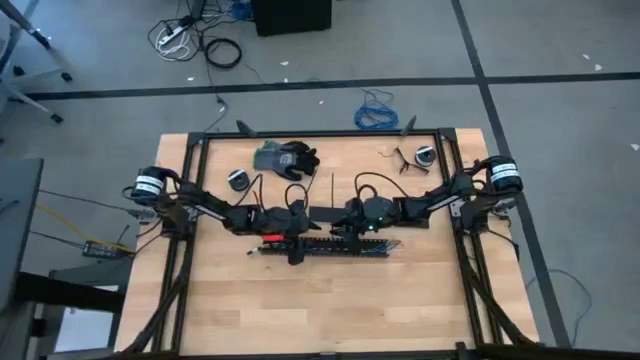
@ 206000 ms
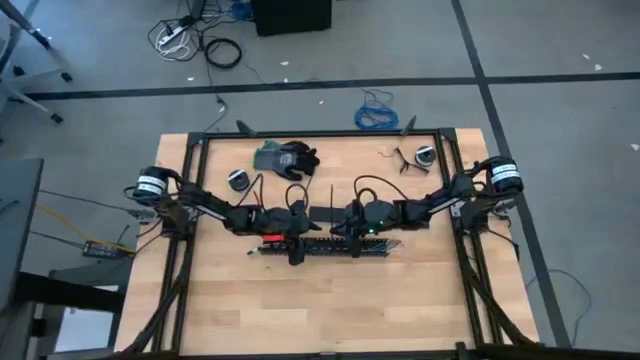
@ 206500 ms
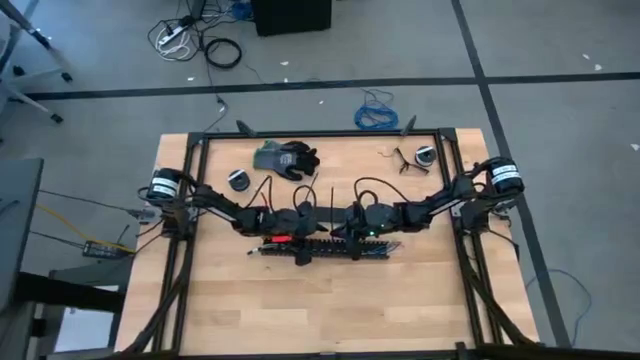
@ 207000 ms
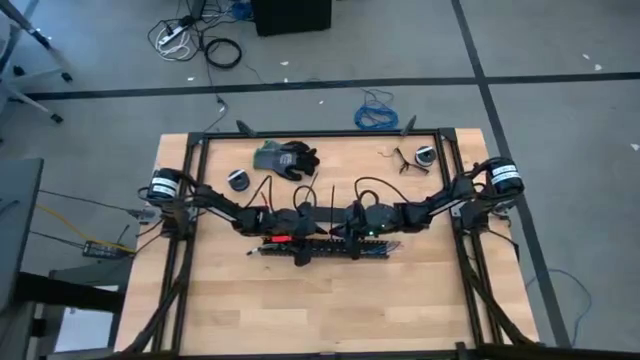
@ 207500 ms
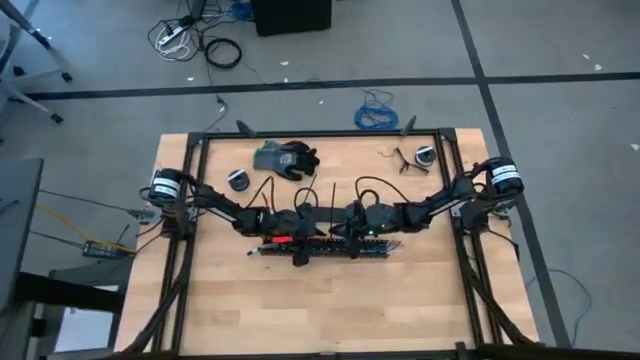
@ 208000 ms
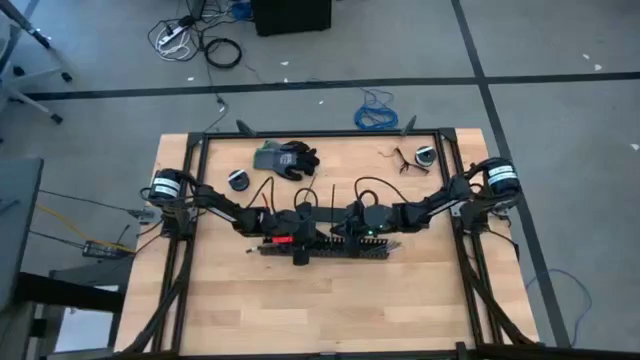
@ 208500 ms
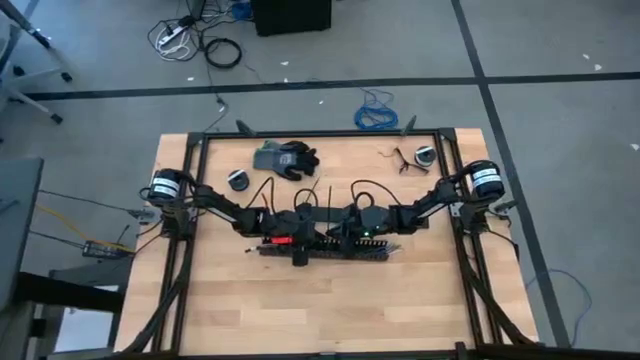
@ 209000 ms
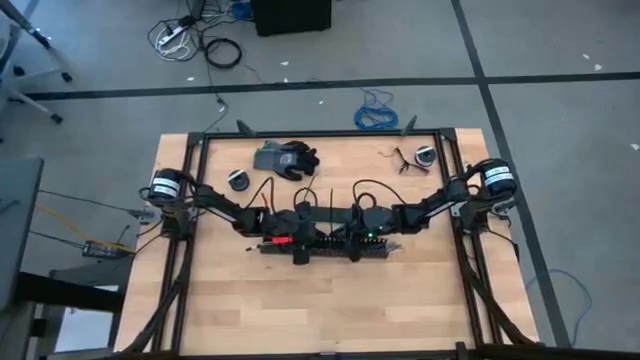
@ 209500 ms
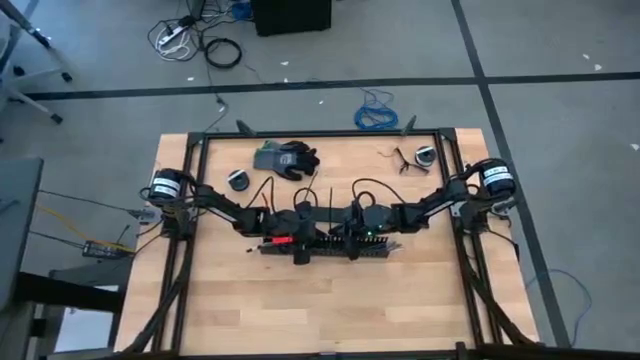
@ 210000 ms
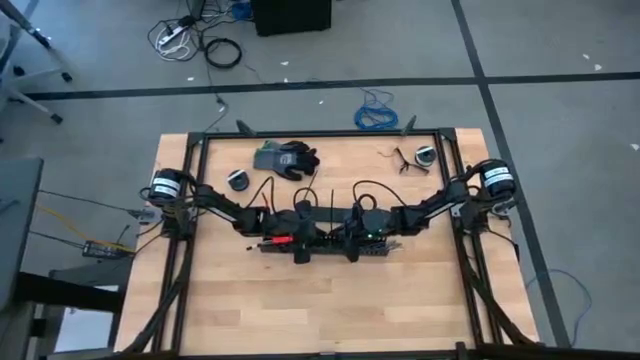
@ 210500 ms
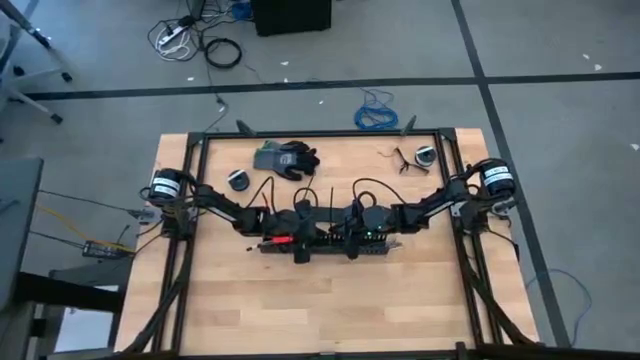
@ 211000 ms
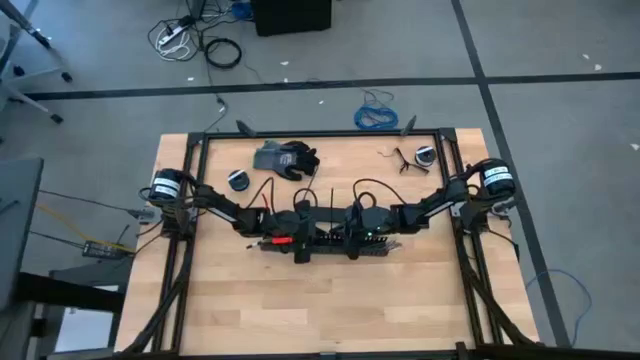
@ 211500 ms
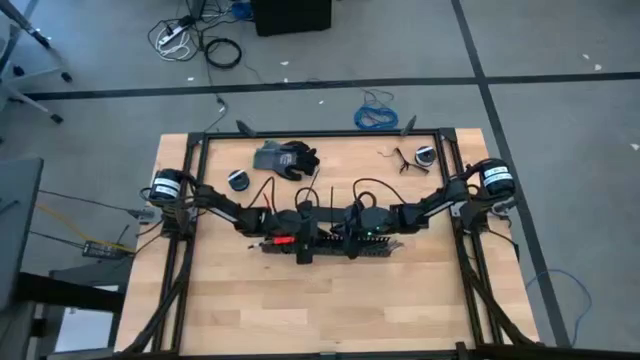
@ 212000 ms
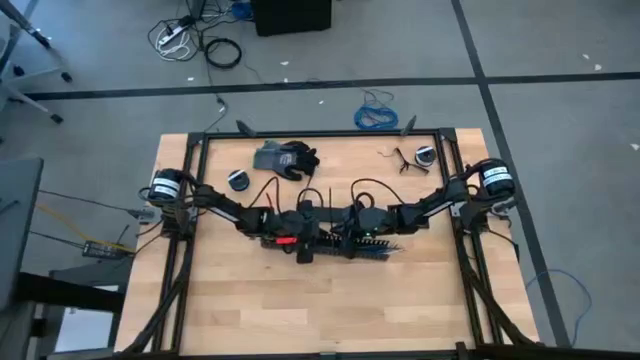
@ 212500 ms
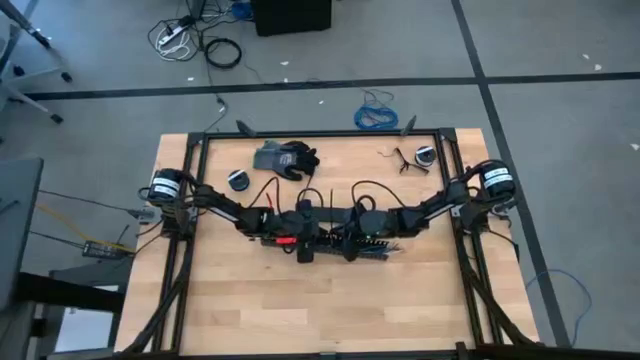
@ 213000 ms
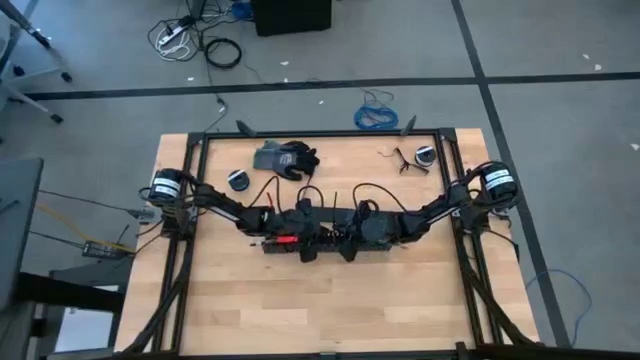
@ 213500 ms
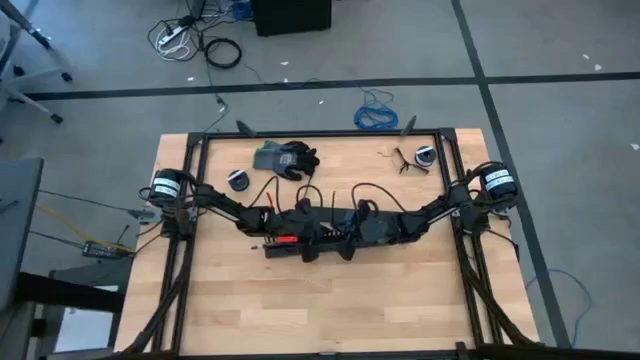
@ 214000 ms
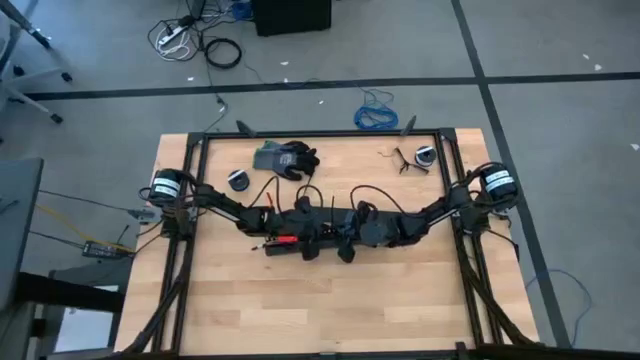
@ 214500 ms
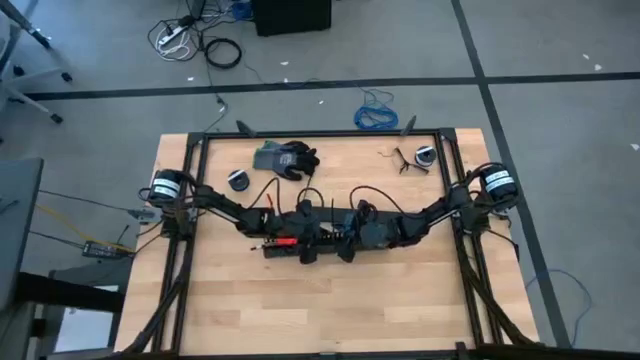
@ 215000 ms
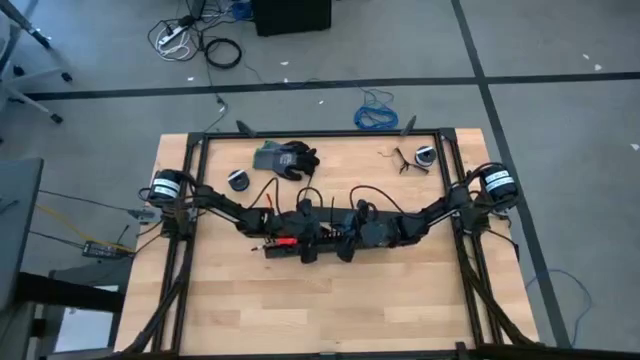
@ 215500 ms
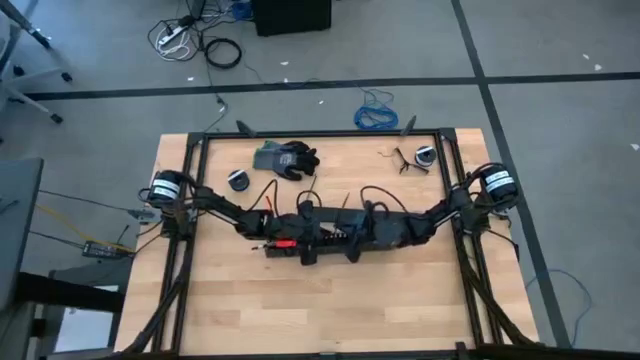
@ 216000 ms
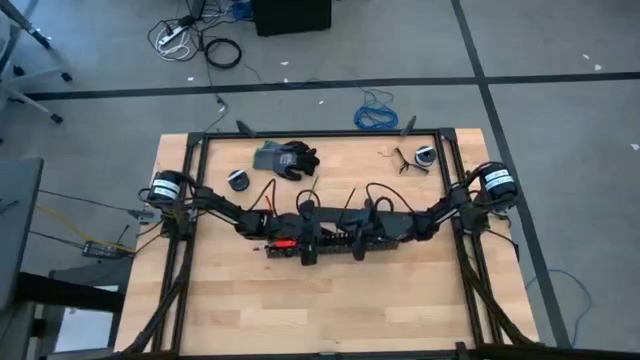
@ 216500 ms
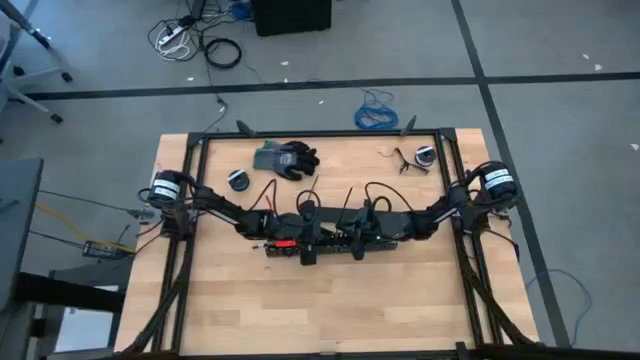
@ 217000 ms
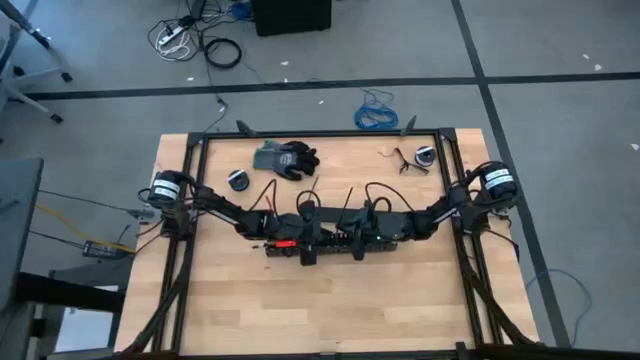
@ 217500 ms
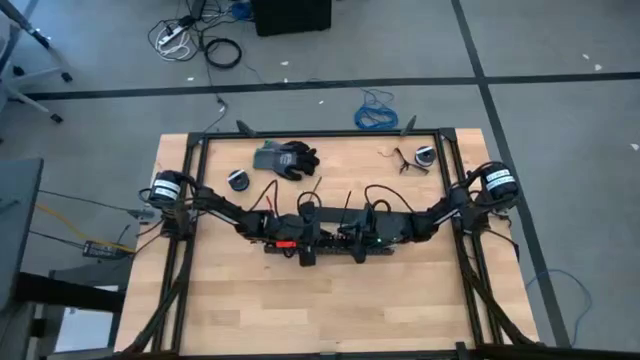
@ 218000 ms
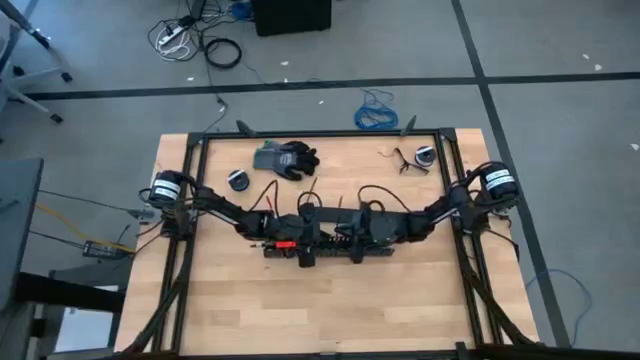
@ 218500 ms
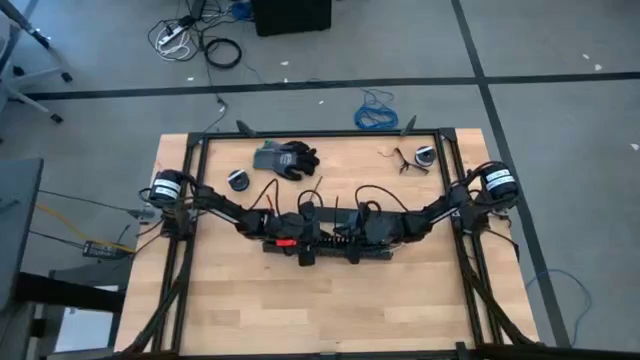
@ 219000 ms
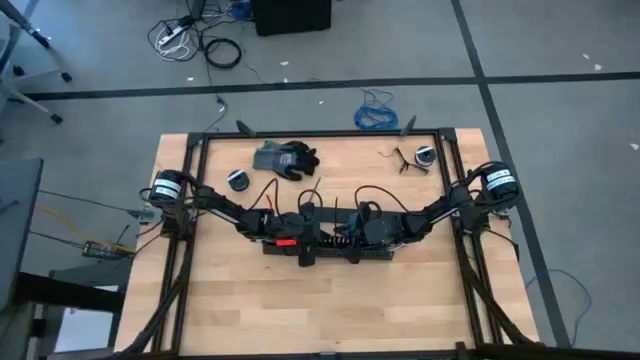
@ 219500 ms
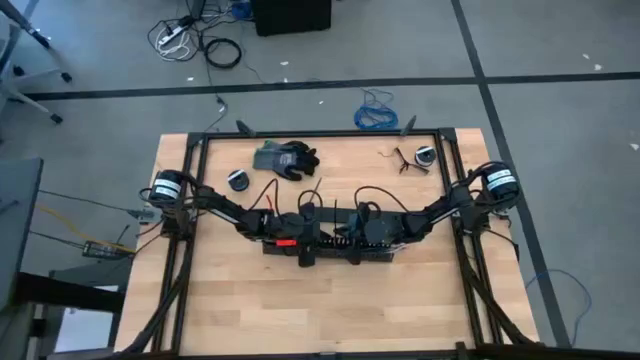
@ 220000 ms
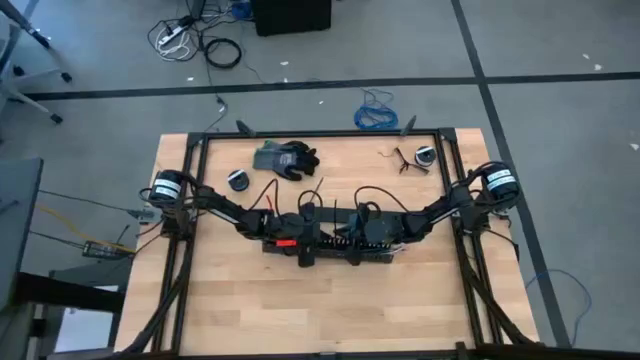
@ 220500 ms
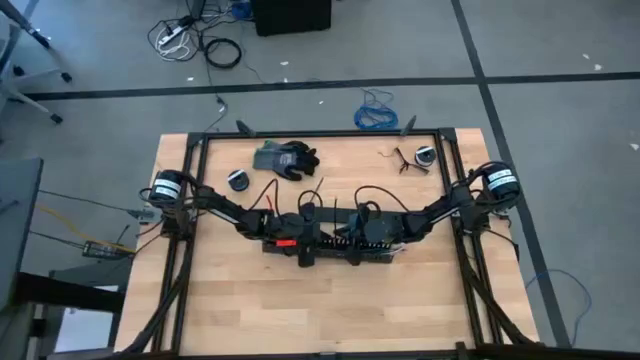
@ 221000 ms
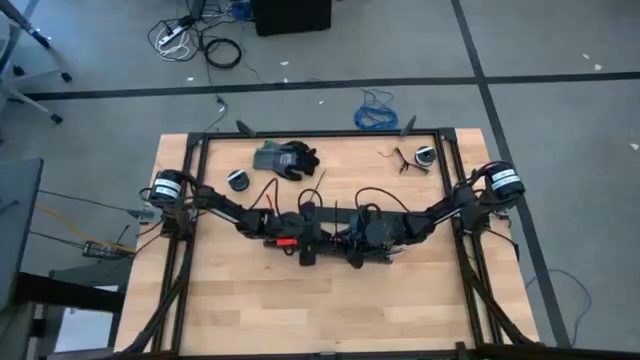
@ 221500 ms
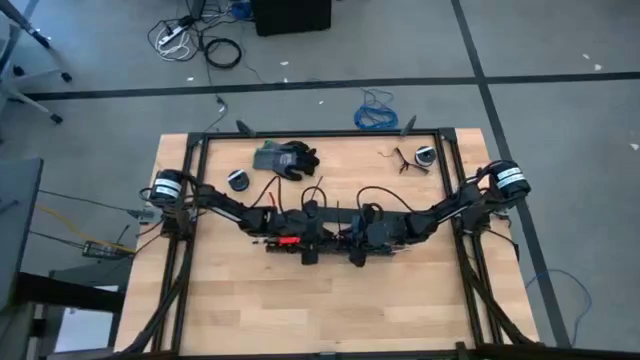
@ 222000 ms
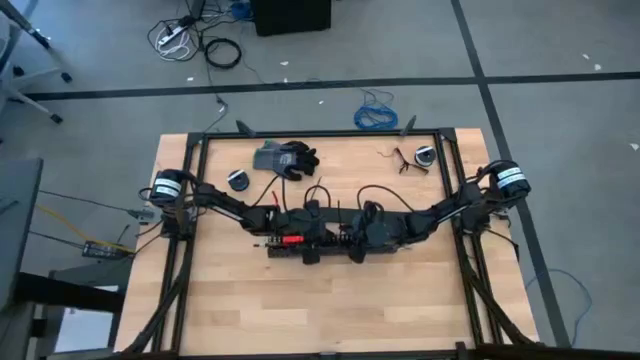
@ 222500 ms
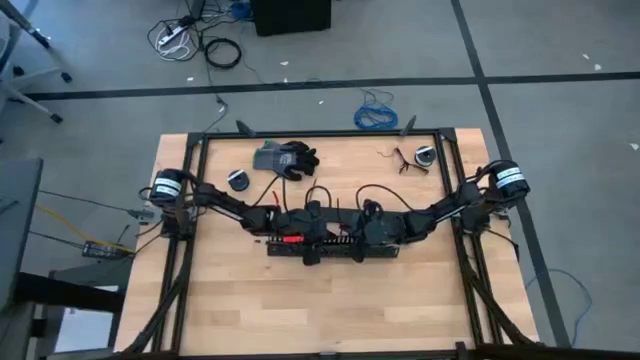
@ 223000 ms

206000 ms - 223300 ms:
Task: Ziptie cables
Put the cable wires in the black cable duct

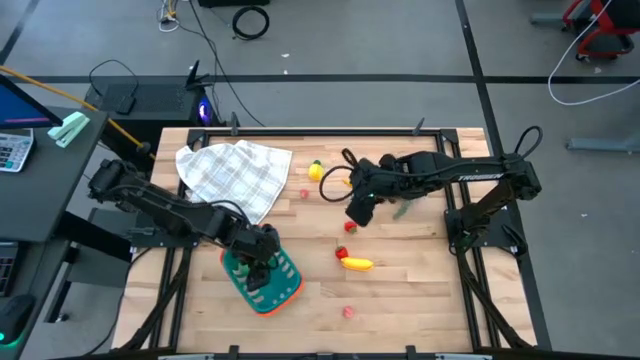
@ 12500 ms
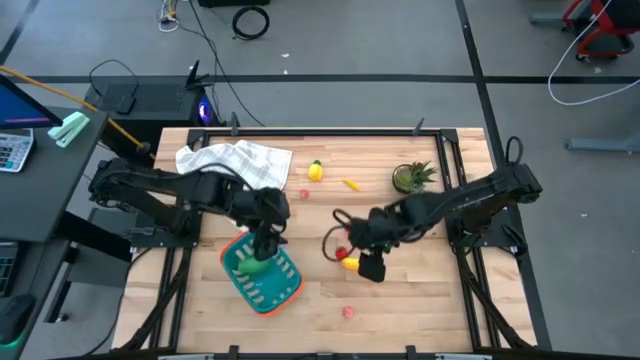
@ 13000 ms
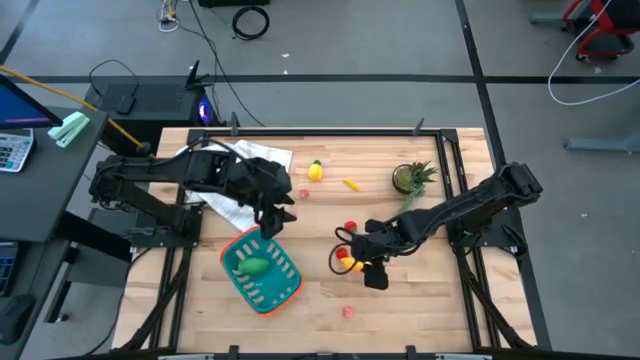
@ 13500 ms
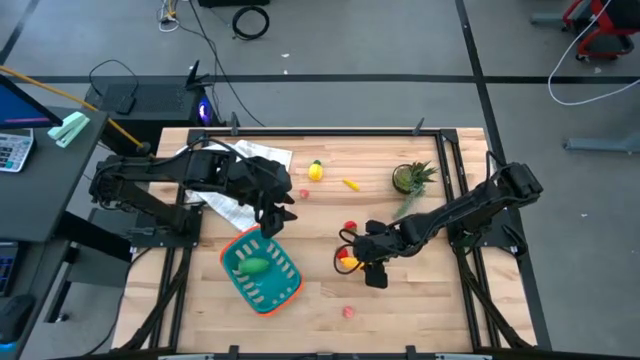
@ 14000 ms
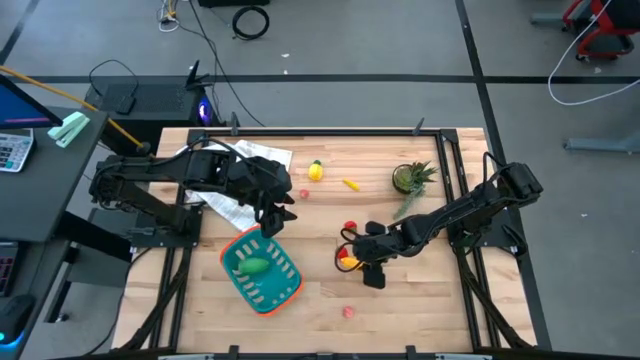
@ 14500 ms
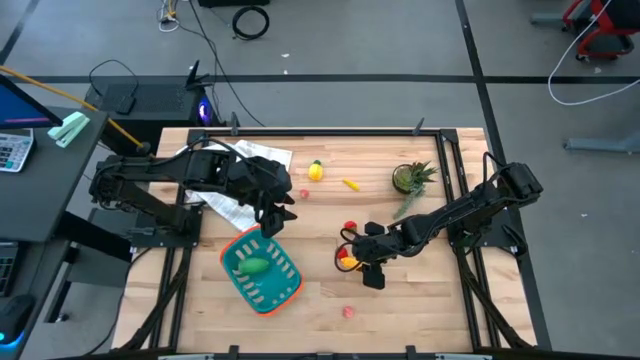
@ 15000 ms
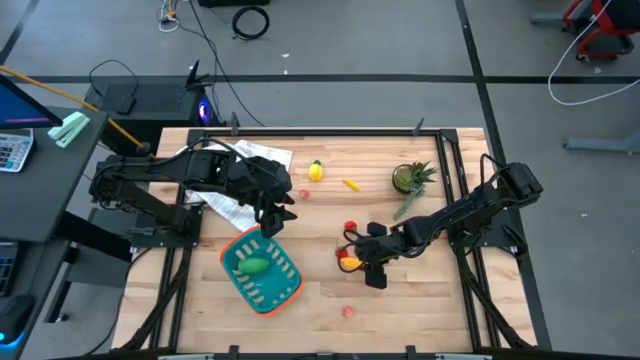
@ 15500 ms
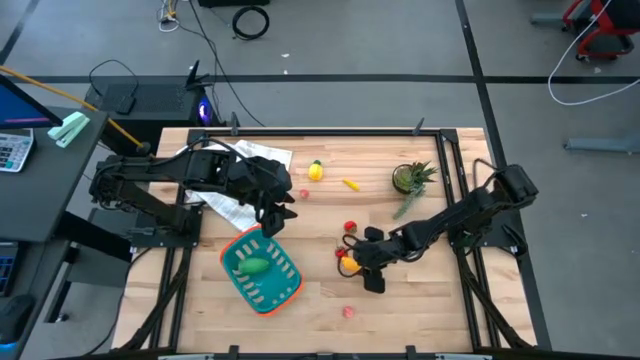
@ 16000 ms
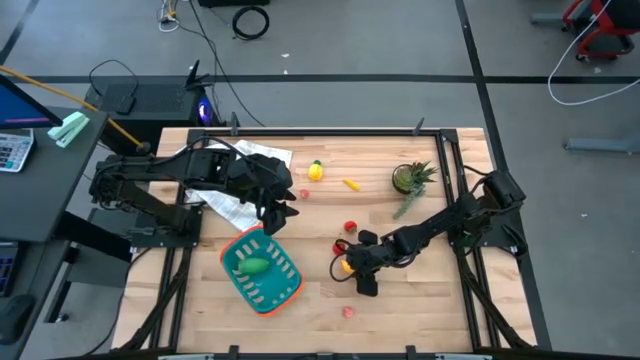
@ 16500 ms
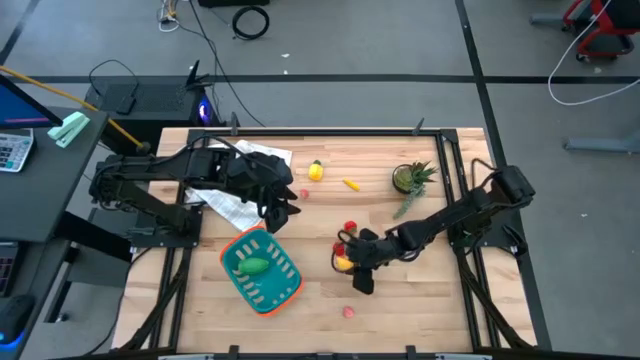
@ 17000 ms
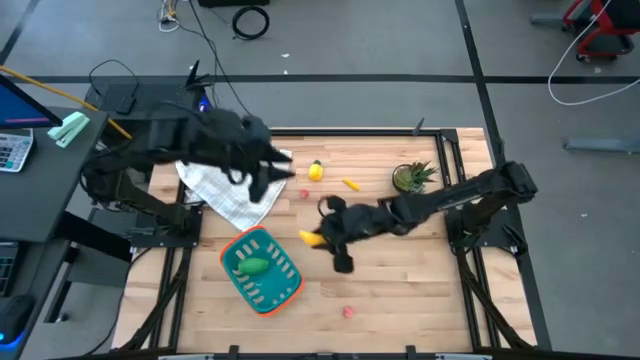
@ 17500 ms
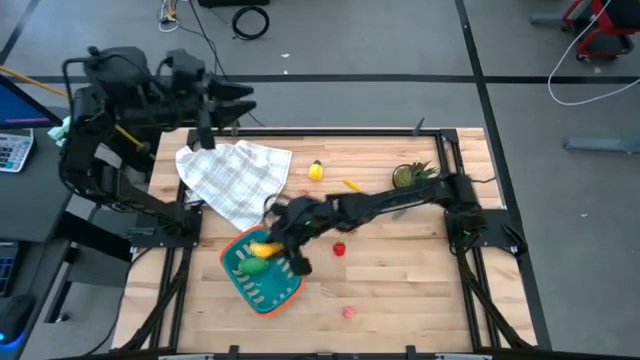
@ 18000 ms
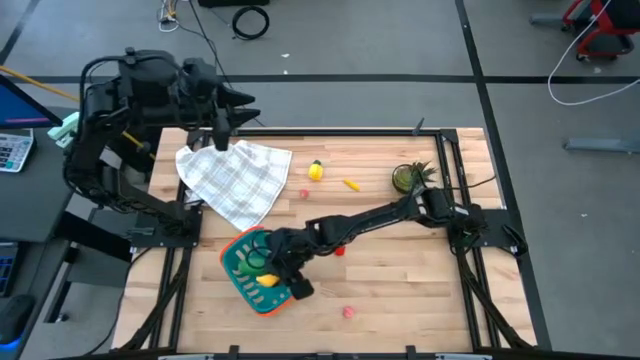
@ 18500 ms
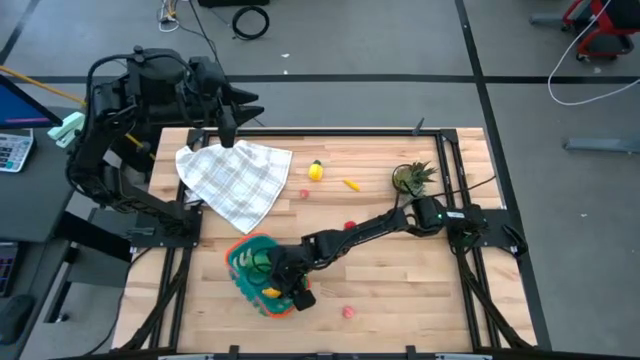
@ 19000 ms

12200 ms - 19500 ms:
Task: Pick and placing Produce into tupperware
Put the yellow banana into the blue basket
